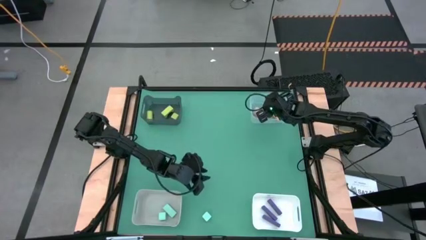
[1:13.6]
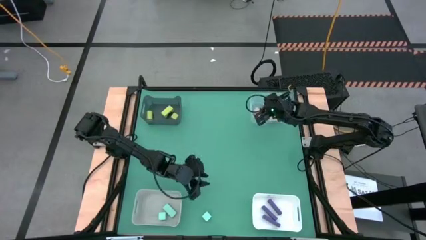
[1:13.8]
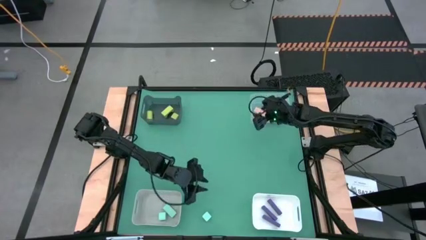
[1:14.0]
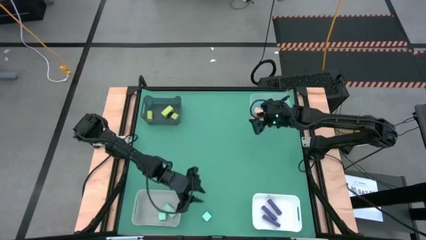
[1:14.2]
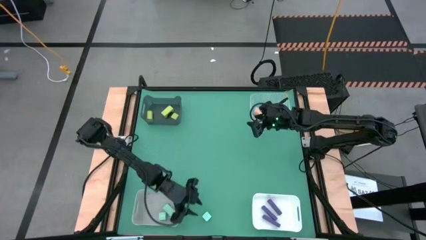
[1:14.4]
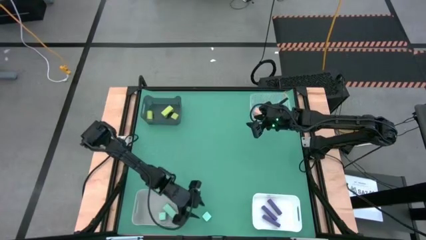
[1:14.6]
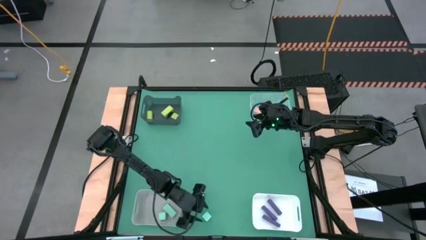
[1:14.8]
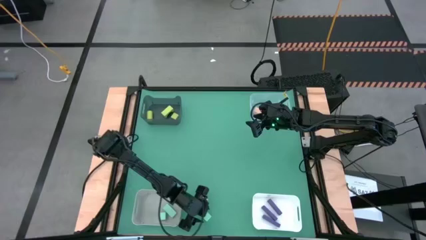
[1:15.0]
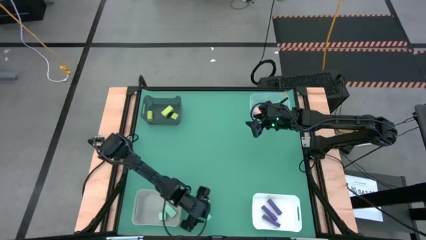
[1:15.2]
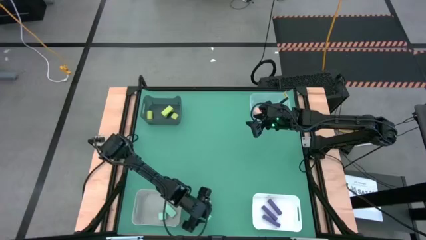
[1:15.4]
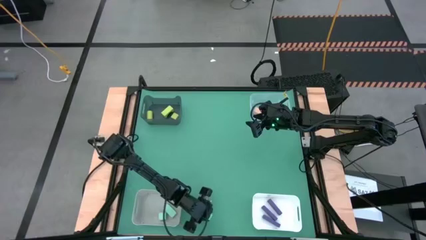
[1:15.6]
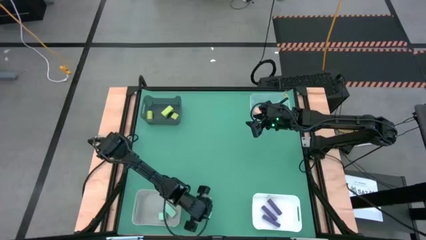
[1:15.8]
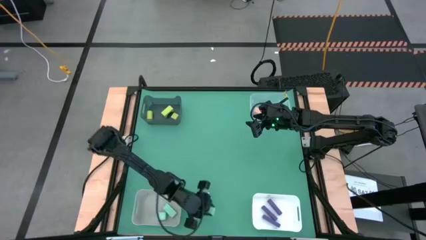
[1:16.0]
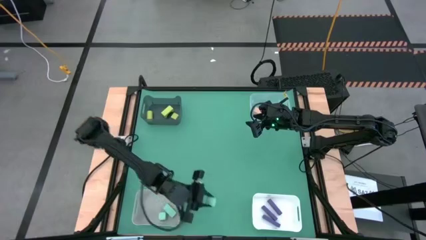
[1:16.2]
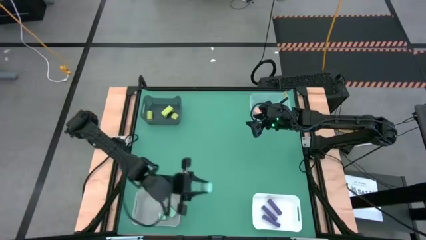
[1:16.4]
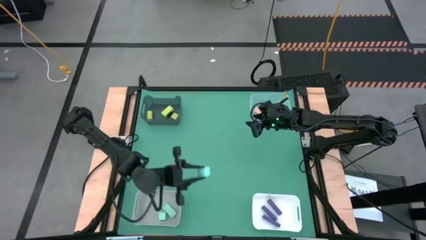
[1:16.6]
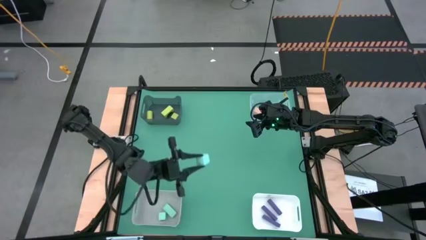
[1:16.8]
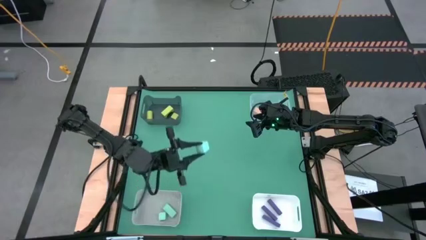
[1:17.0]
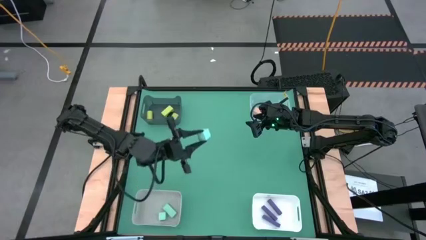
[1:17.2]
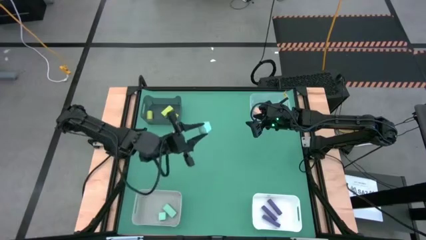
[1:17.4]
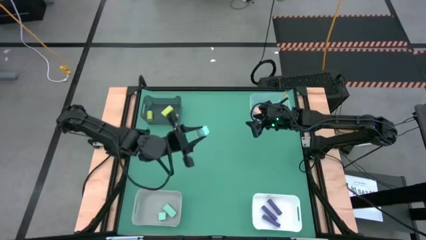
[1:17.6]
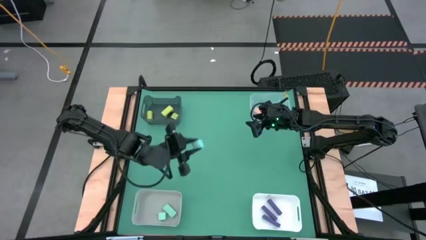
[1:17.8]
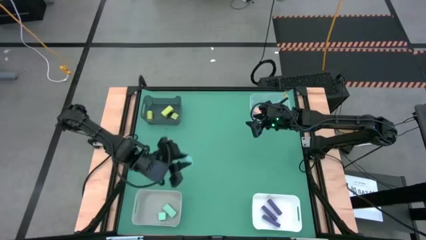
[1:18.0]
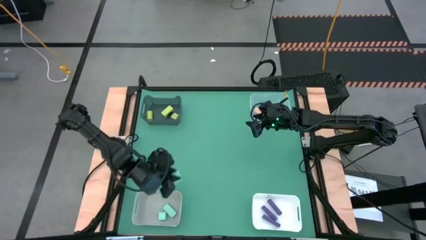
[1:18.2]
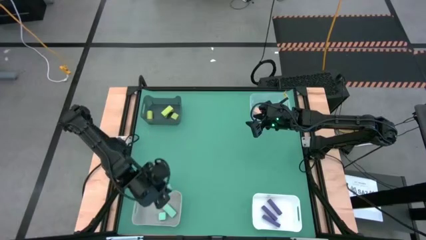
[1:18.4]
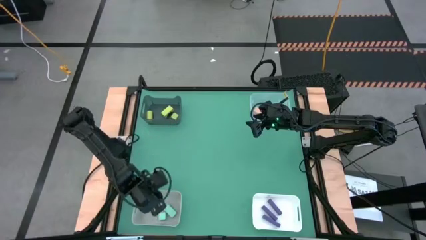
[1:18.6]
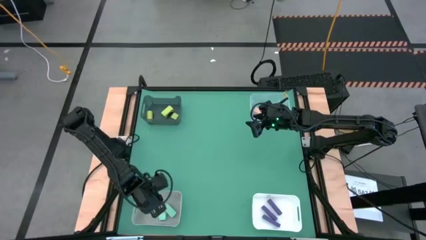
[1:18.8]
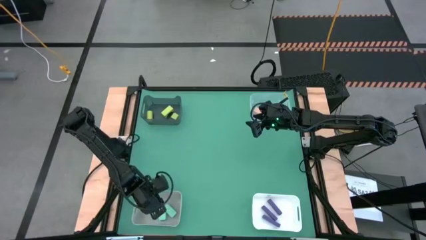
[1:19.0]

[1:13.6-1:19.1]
Task: Sort & place blocks by color
Put the light blue block into the gray bin

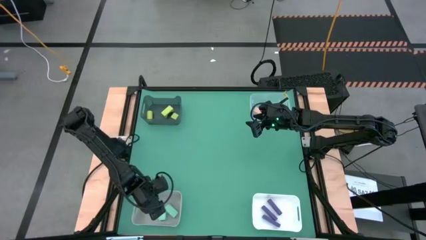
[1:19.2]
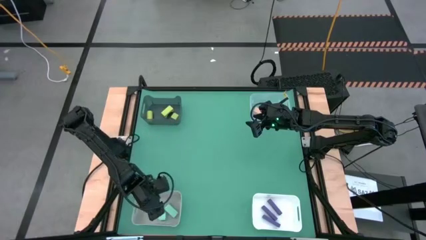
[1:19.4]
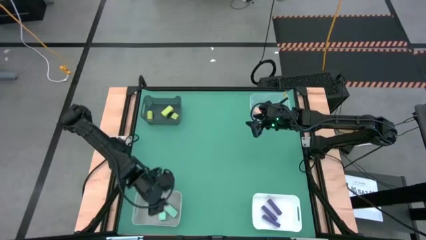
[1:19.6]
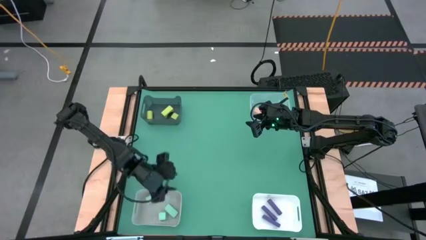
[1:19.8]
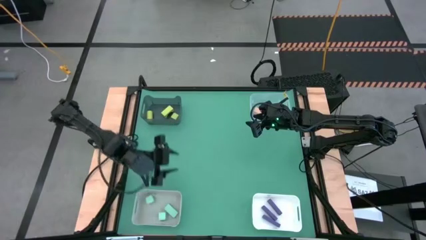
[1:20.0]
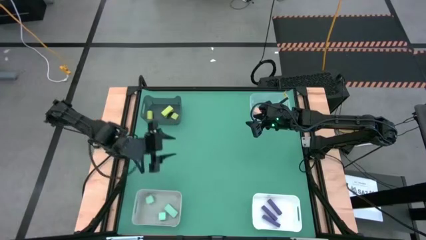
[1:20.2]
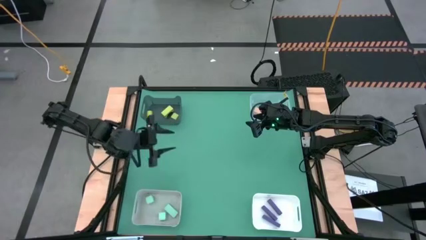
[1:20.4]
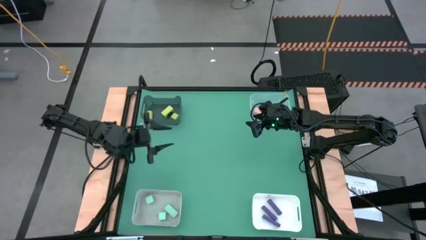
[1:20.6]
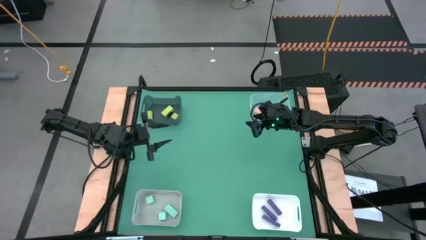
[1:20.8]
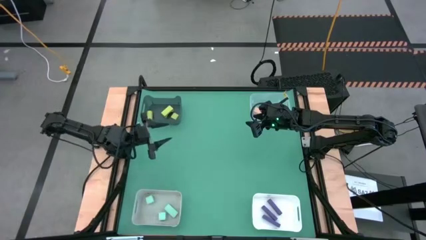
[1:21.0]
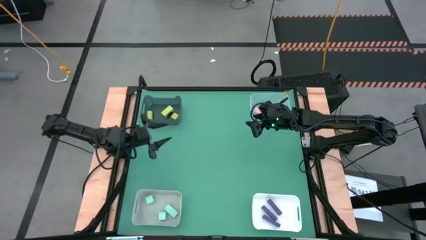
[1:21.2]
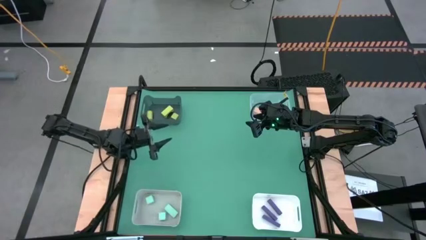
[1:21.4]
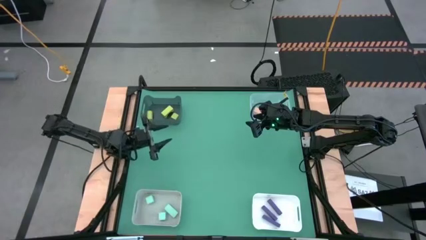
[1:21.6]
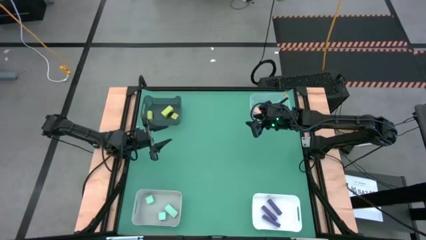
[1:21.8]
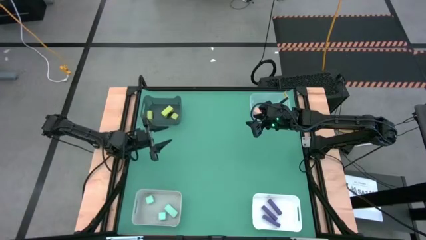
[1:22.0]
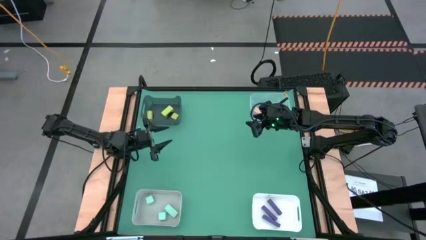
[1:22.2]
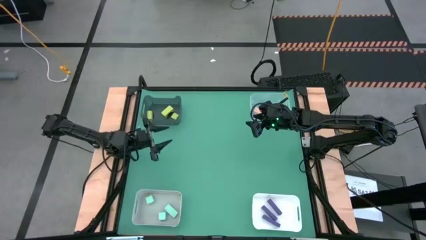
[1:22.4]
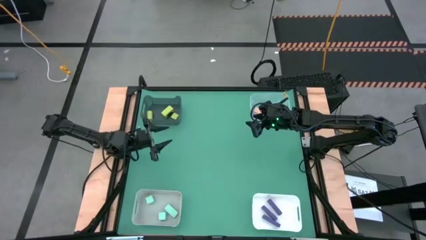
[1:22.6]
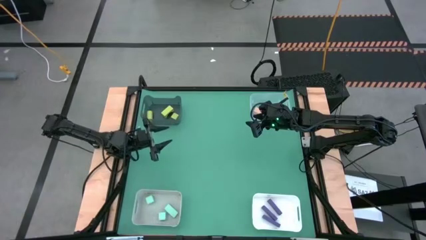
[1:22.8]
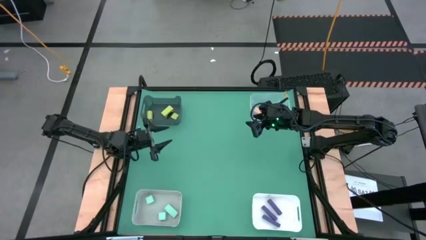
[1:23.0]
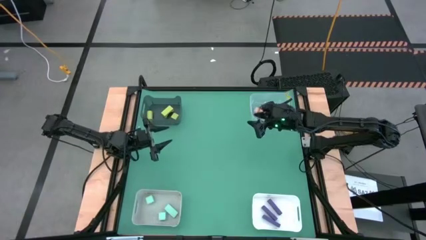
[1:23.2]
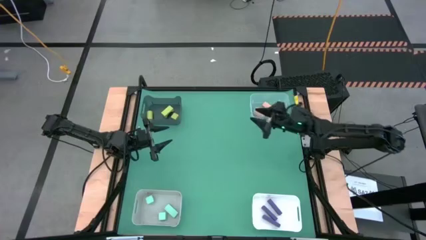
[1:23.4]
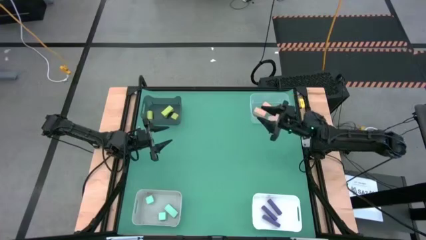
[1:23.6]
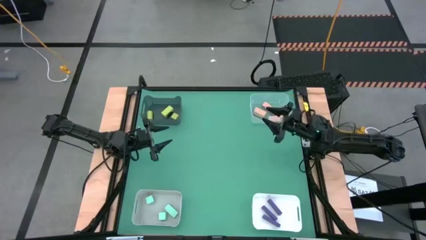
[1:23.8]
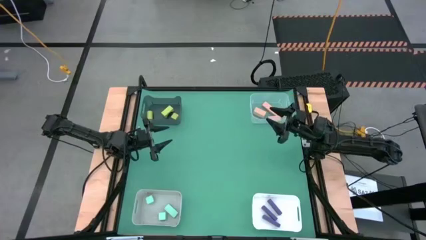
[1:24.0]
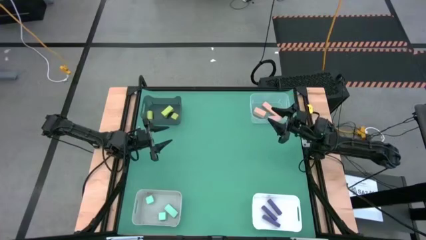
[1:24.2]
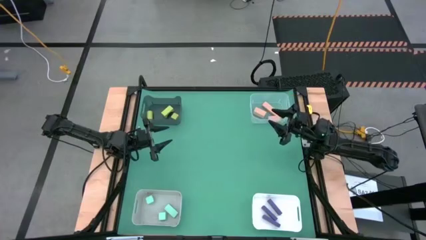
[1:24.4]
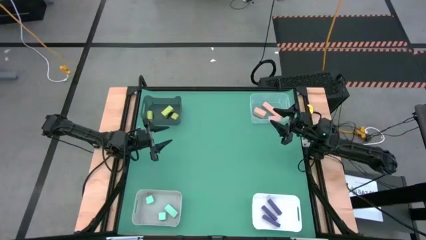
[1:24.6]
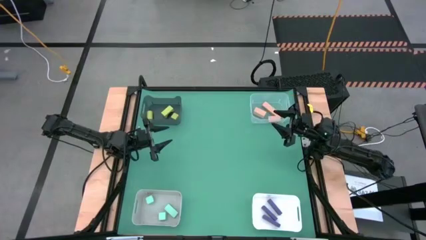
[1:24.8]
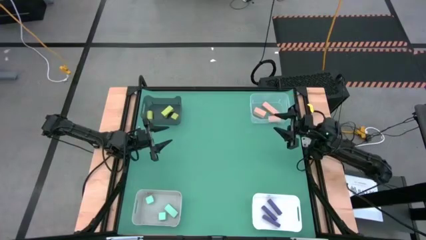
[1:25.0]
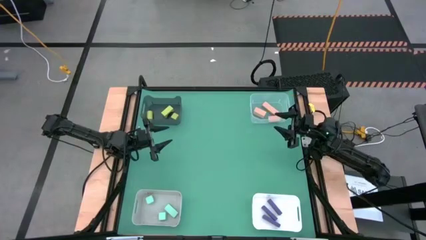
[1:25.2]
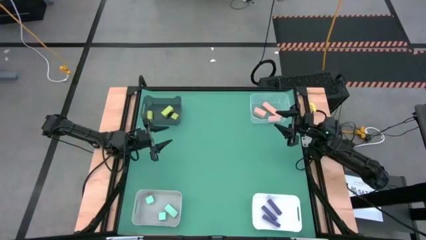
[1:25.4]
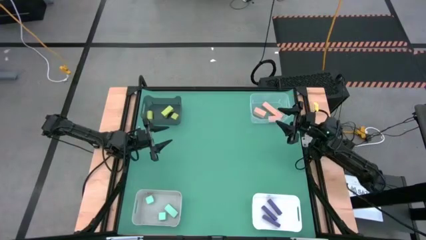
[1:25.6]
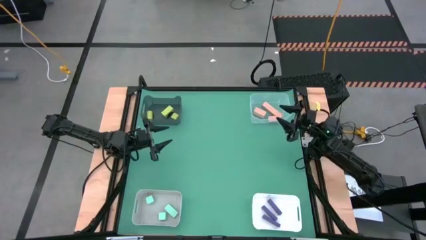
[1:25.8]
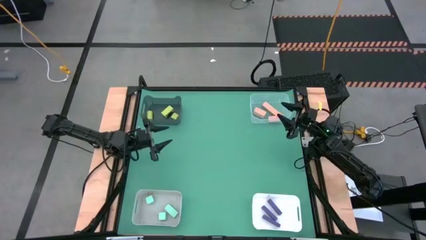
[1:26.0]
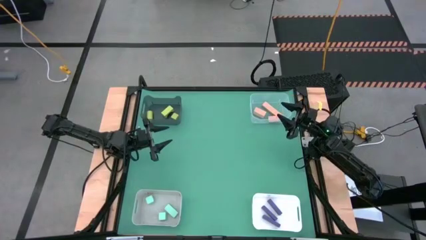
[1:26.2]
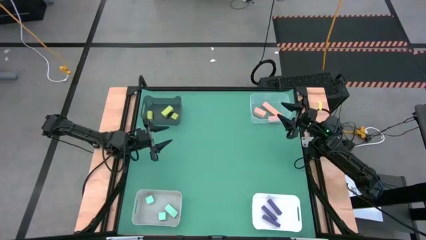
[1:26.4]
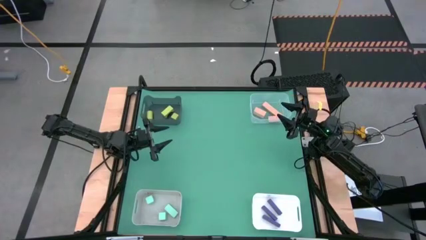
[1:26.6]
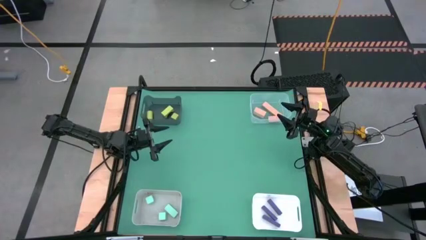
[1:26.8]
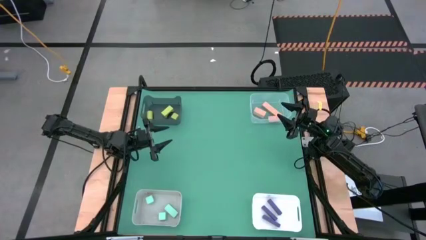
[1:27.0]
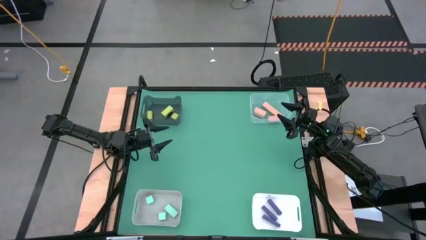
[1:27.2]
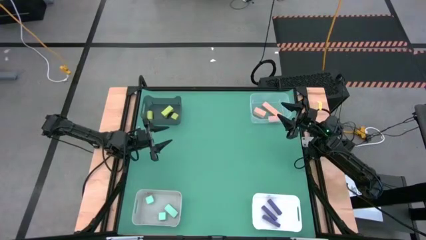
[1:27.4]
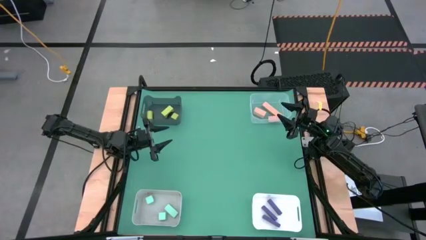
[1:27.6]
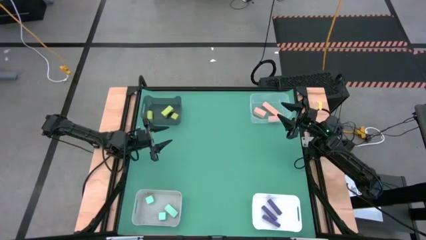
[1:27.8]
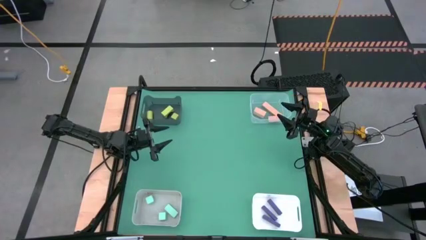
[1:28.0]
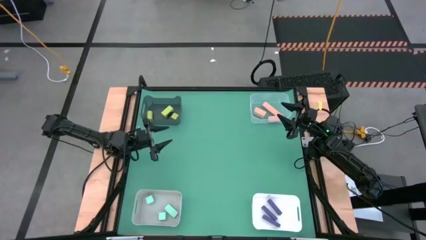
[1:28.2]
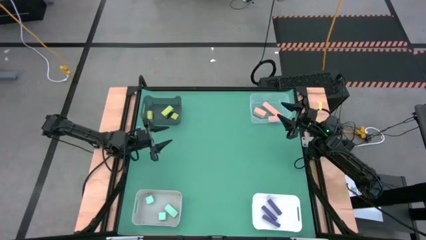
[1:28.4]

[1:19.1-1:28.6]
Return to Home Position

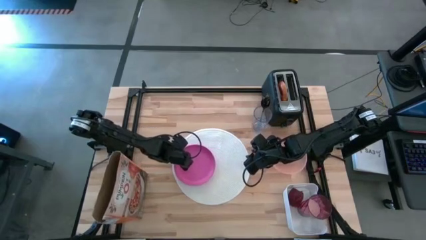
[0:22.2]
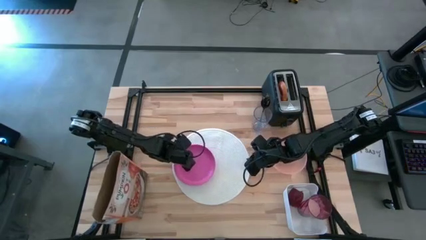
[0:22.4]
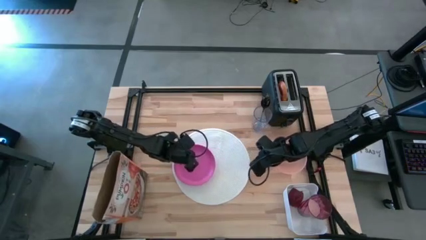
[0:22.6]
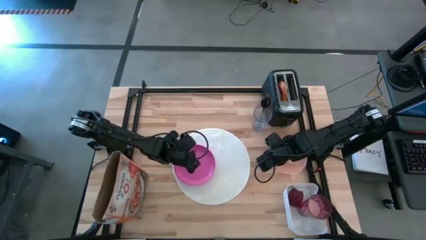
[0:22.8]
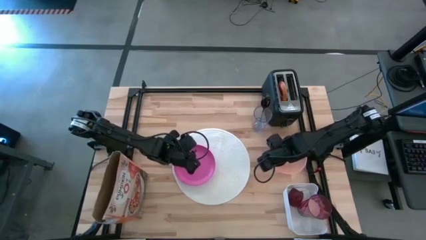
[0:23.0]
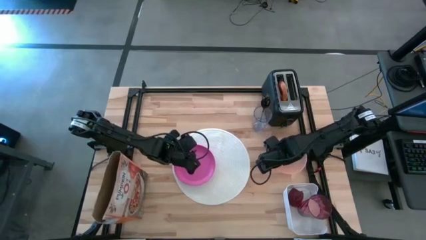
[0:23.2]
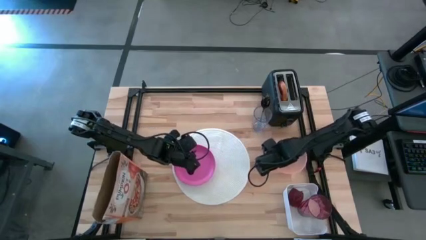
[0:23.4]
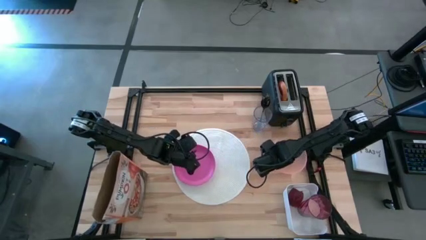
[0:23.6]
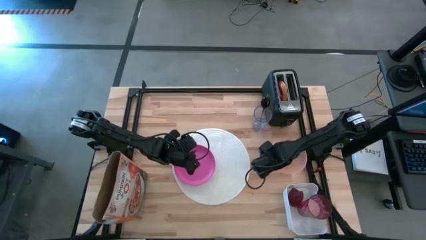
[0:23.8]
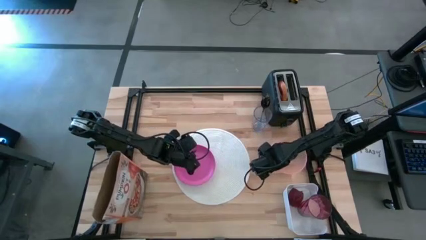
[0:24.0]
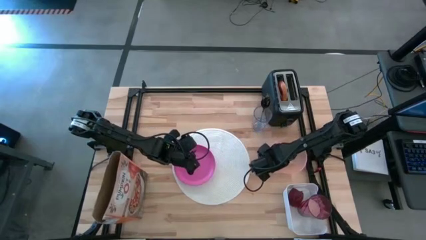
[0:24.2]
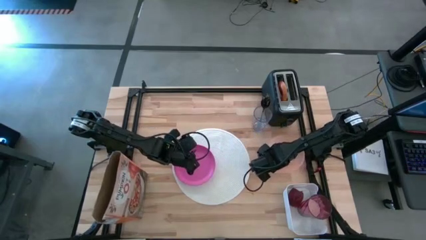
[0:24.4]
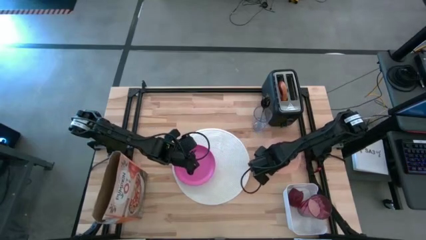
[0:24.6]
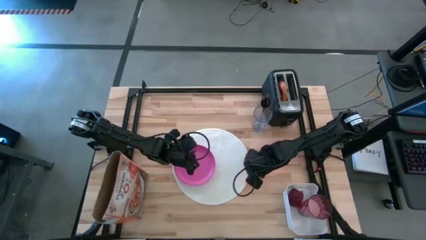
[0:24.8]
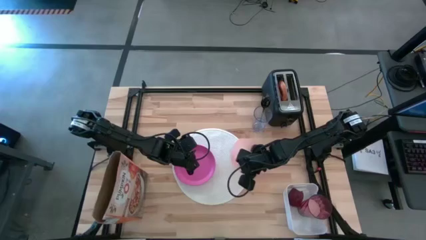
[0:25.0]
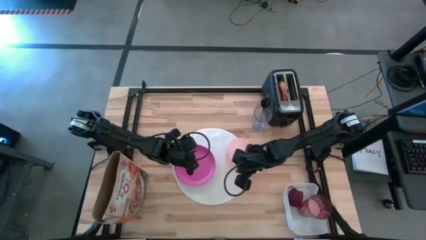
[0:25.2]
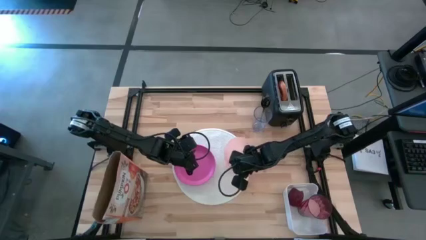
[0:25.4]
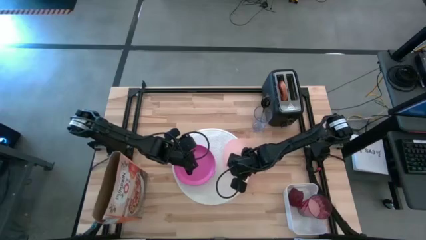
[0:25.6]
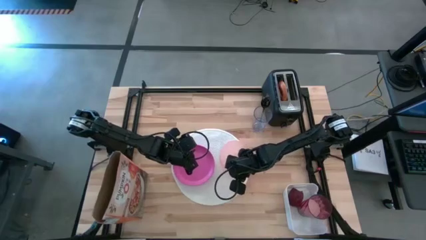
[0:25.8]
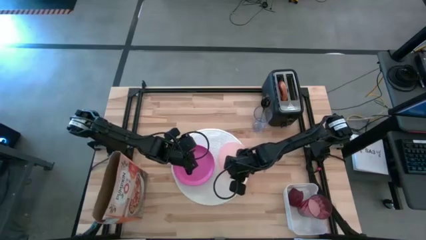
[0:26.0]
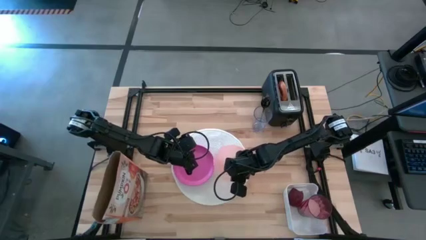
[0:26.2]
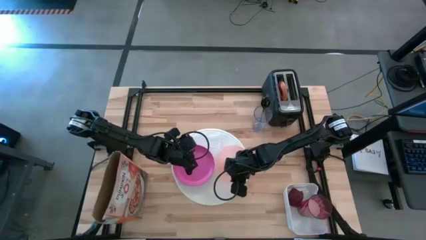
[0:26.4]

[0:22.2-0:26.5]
Task: Arrange a breakfast setting
Put the orange bowl to the right of the pink plate on the white mat
